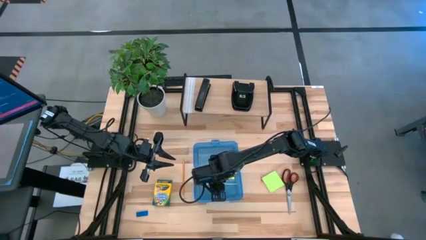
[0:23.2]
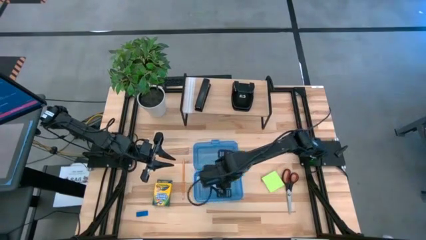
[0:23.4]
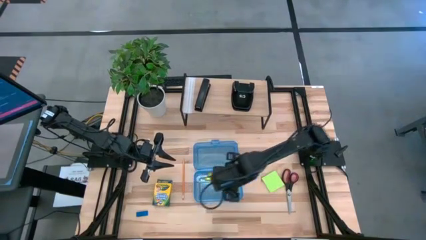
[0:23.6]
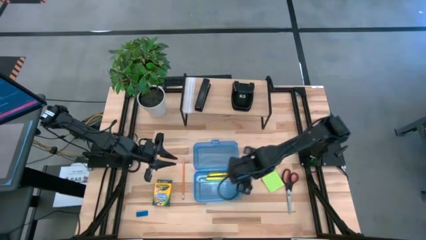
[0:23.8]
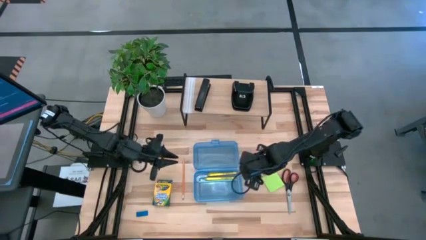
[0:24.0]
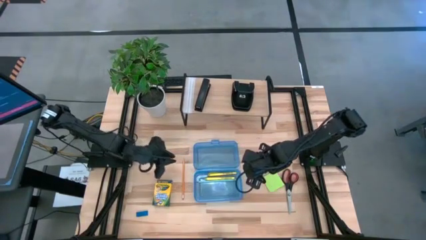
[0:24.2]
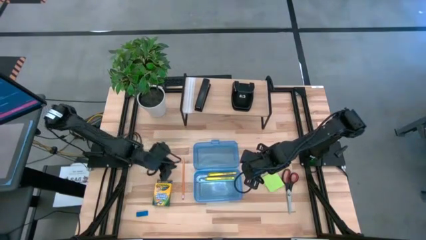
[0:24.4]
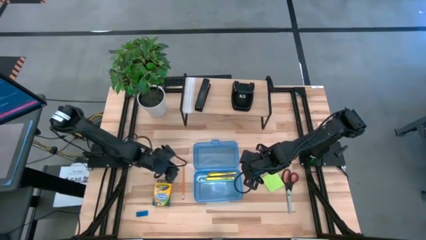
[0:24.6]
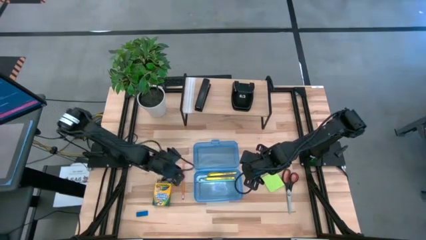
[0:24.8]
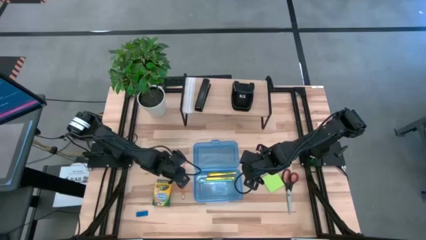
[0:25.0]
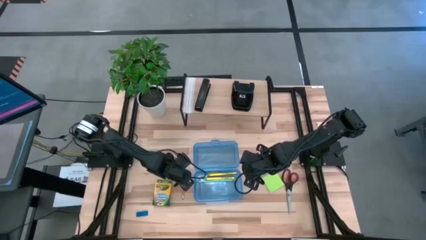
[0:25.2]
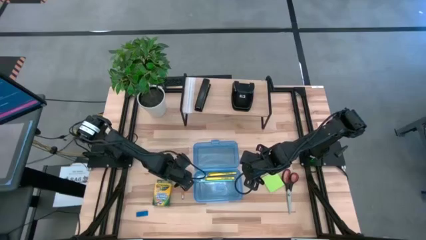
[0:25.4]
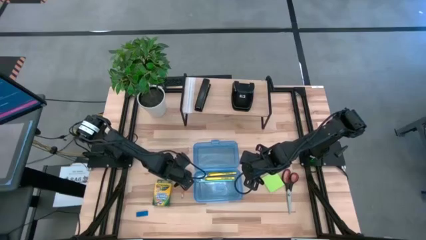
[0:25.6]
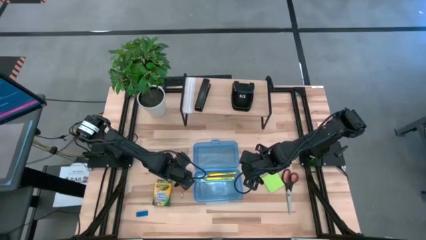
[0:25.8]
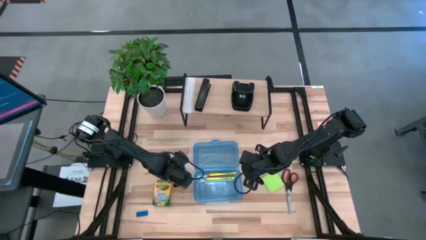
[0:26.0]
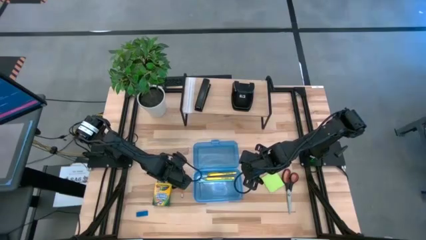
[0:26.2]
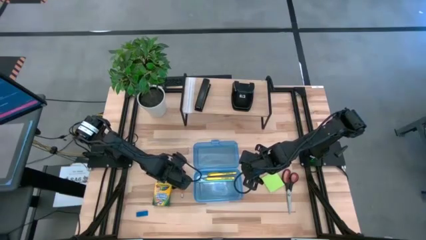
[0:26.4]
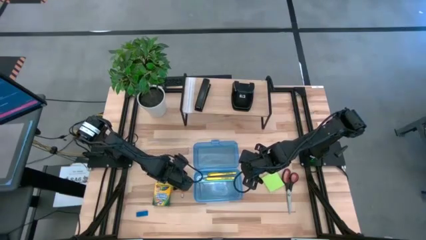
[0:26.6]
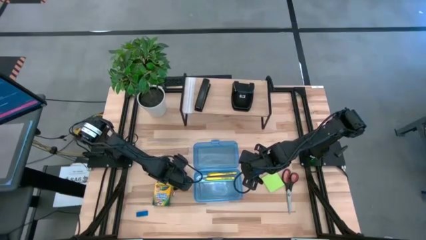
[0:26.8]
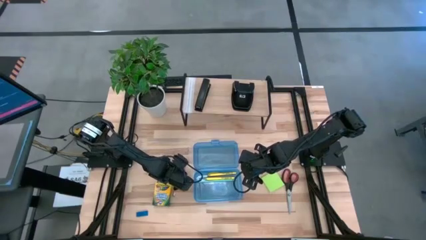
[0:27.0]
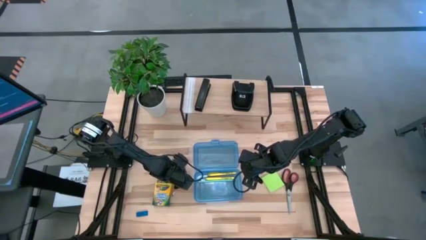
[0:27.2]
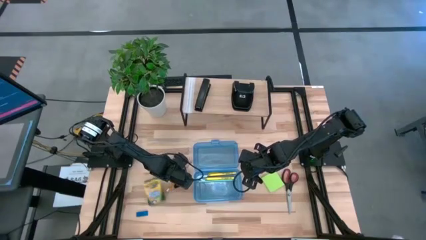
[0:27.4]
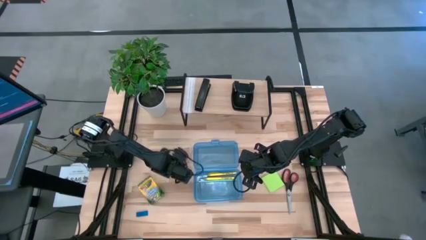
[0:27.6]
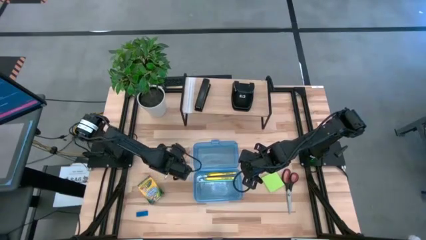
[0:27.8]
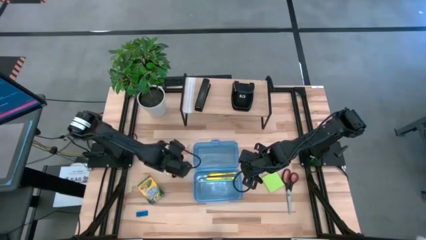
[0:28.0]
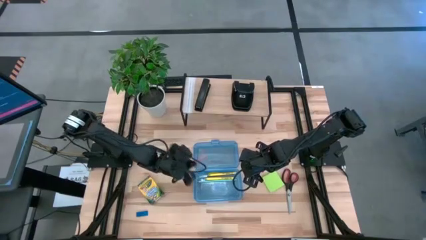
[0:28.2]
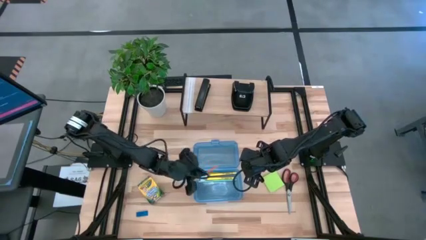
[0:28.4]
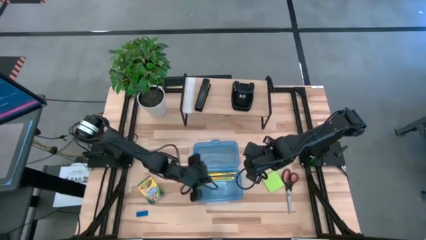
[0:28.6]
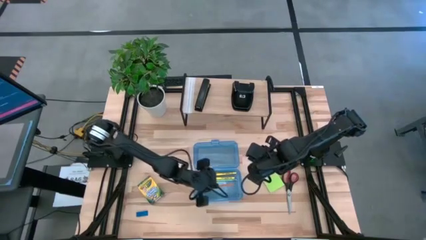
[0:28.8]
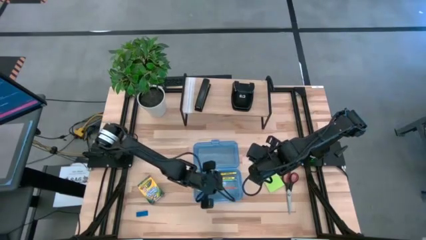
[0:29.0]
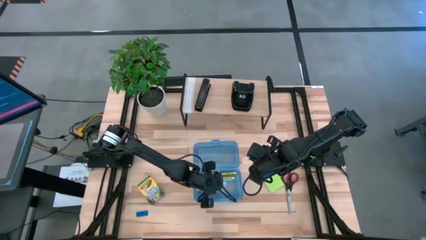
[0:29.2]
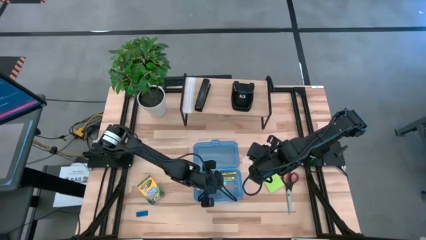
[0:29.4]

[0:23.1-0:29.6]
Task: Pack school essentials
Put the orange pencil into the blue supply box

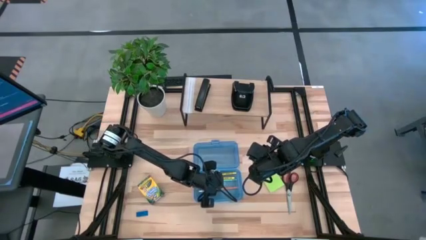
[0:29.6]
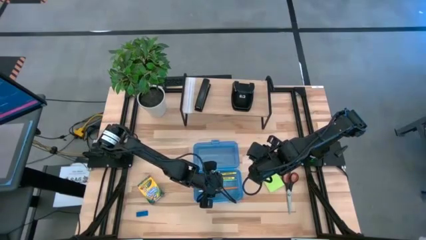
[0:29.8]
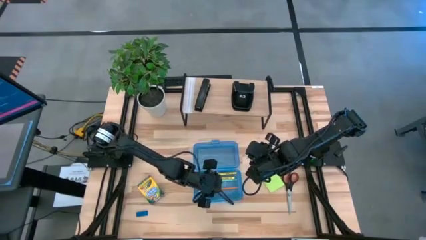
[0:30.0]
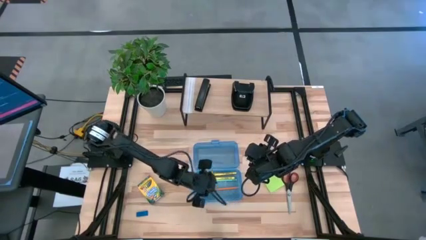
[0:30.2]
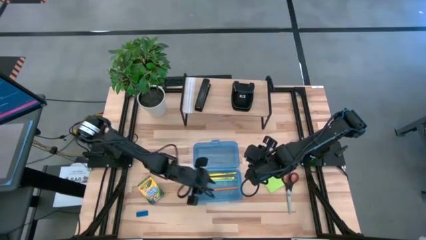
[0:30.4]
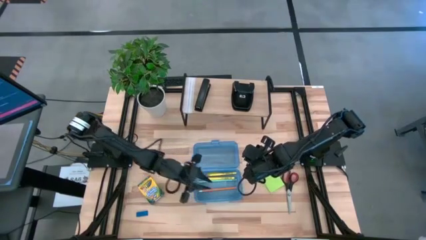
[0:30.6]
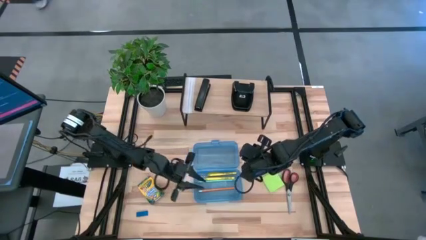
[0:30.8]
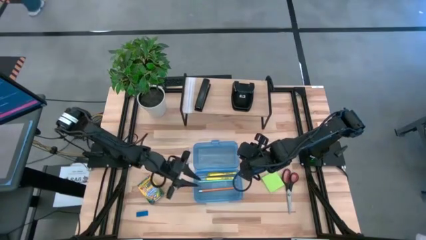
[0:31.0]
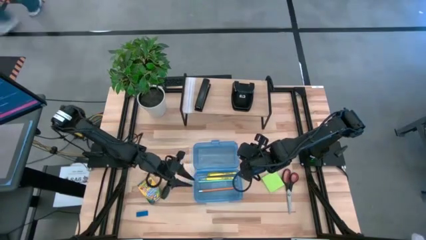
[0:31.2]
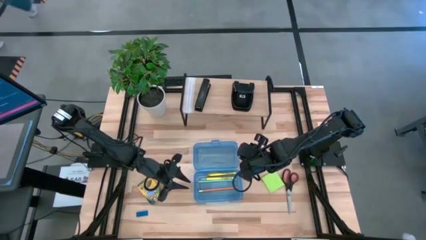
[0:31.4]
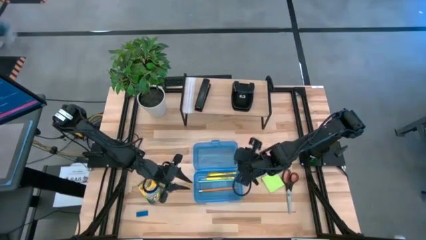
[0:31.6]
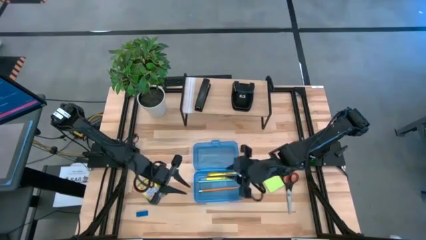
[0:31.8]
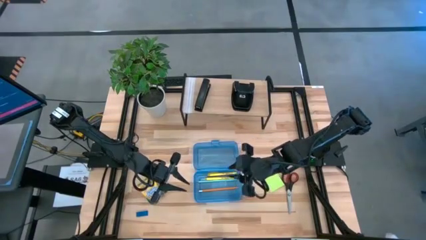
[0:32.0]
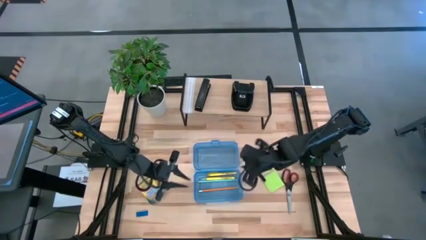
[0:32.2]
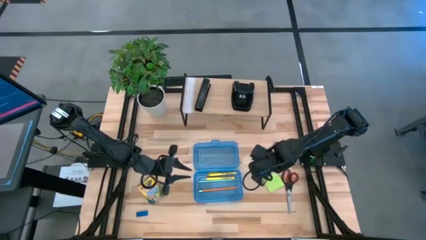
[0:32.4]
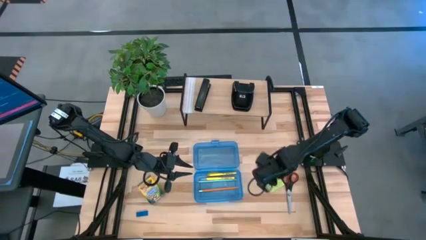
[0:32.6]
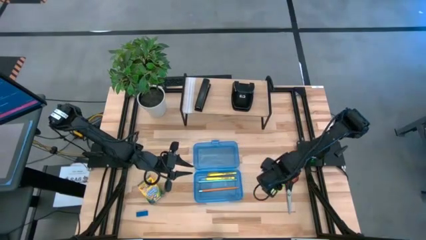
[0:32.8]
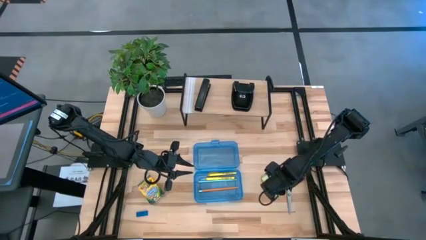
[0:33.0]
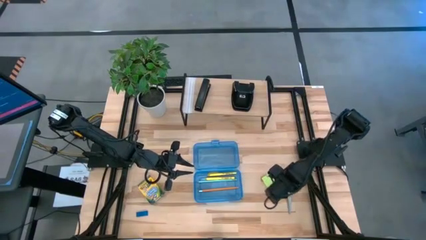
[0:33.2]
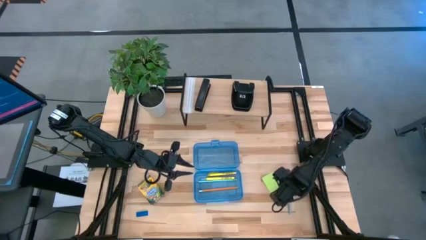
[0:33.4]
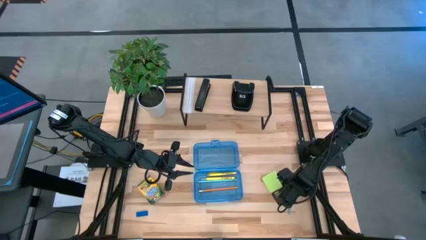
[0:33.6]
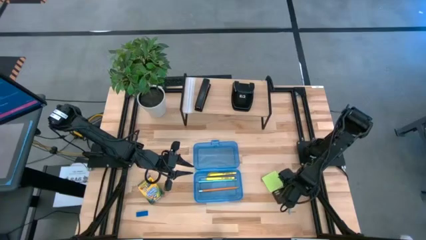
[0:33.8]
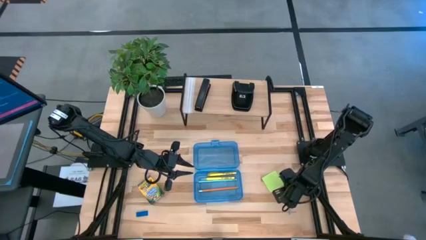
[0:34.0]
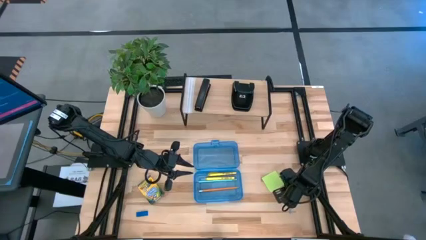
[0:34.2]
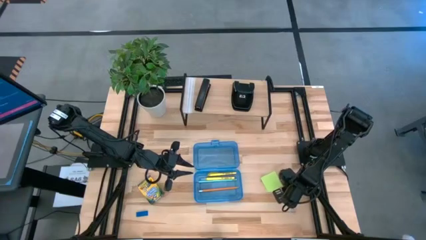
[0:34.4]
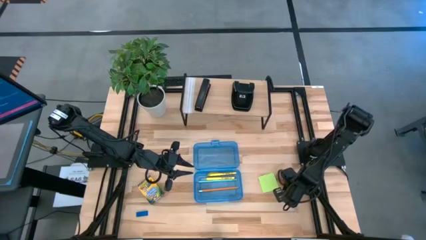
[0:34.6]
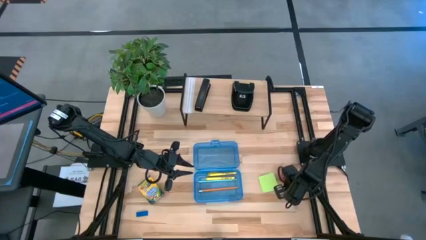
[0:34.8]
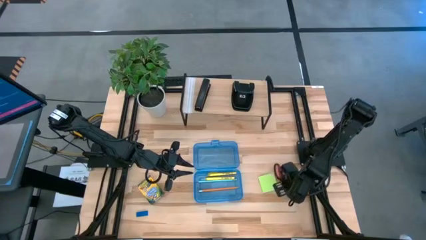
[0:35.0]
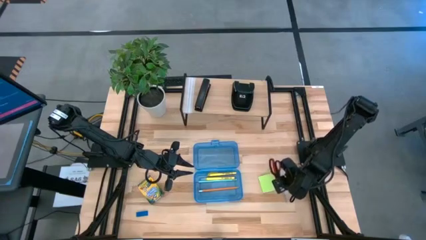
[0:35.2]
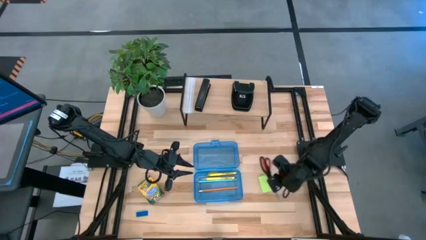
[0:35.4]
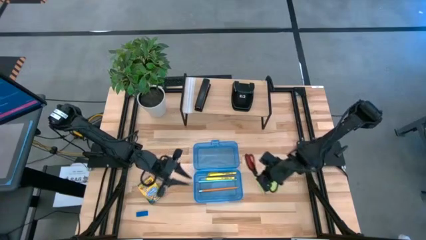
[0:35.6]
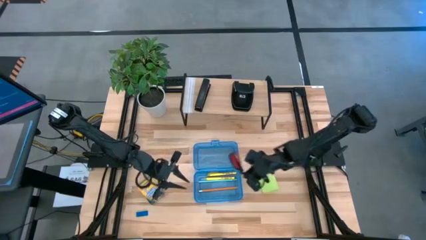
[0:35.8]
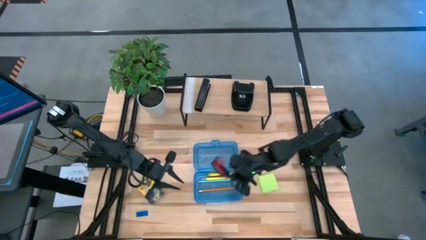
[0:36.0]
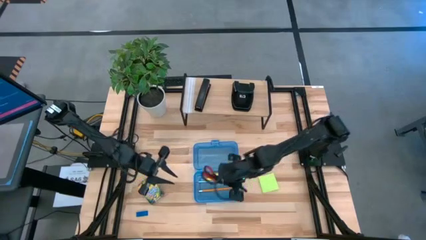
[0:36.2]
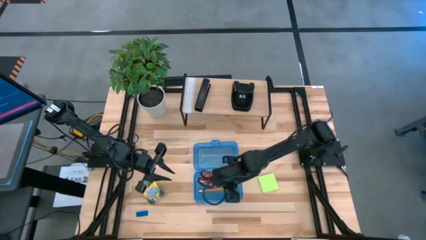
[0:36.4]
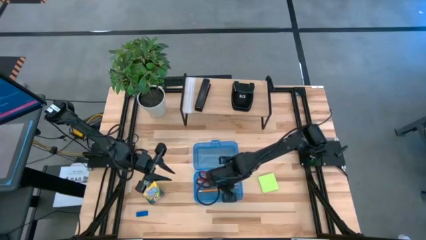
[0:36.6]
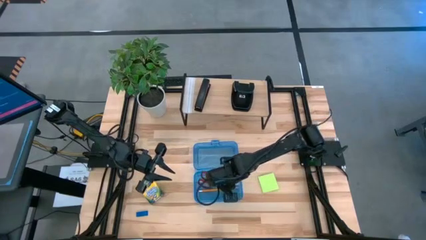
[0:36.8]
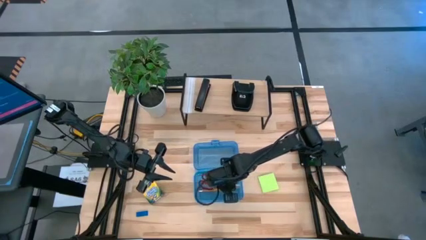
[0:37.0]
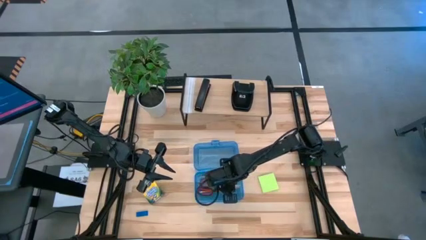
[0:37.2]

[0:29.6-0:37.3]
Put the black scissors into the blue supply box
